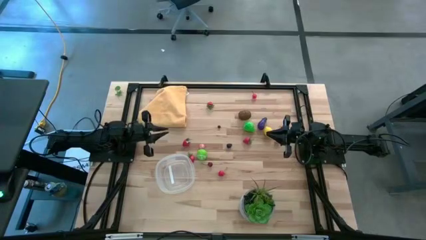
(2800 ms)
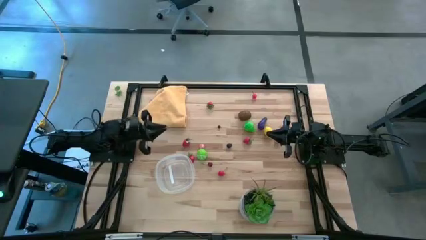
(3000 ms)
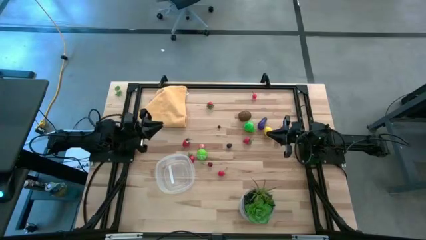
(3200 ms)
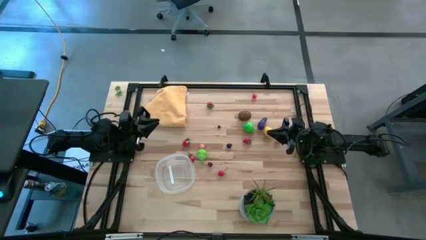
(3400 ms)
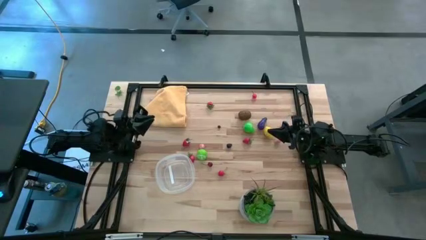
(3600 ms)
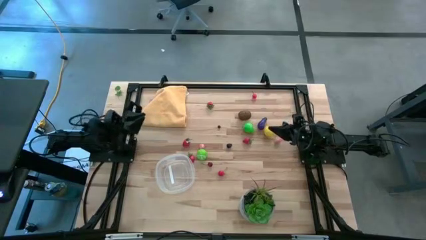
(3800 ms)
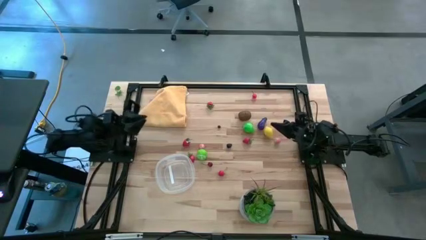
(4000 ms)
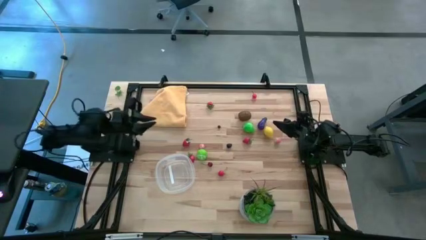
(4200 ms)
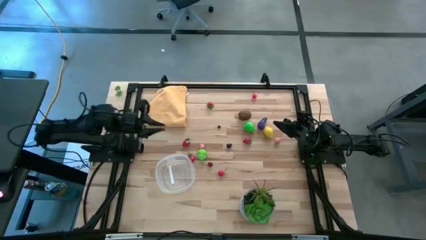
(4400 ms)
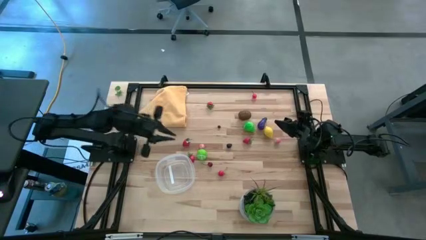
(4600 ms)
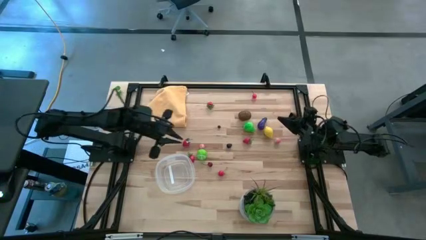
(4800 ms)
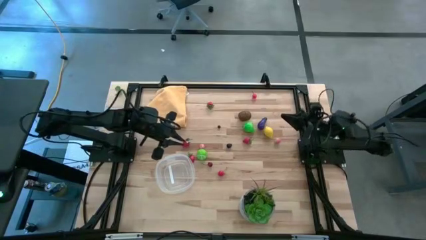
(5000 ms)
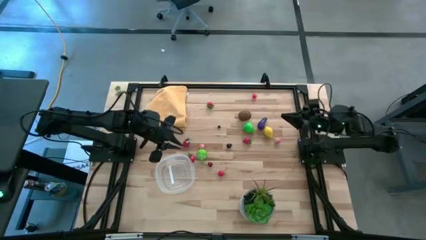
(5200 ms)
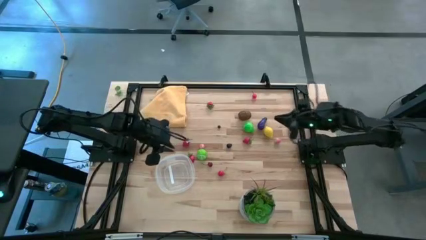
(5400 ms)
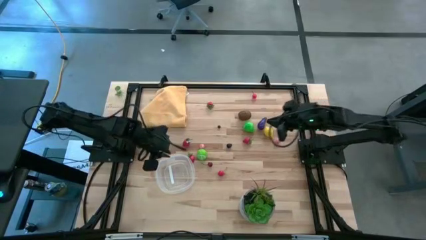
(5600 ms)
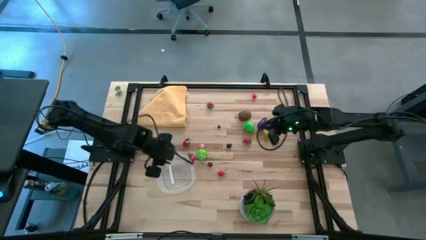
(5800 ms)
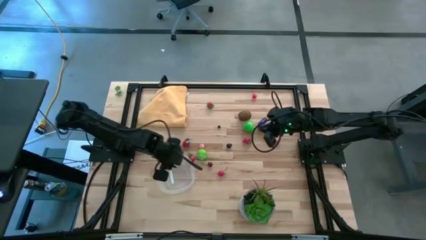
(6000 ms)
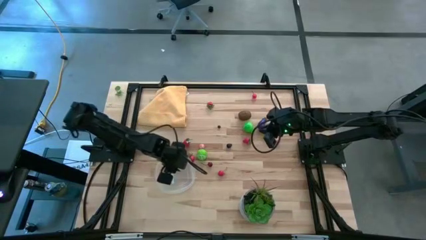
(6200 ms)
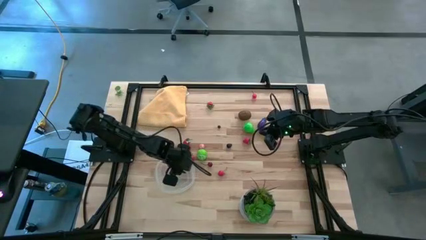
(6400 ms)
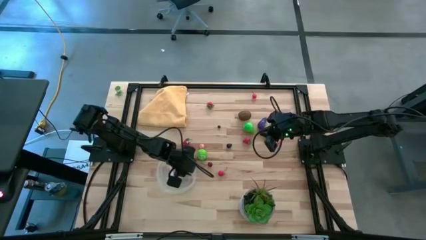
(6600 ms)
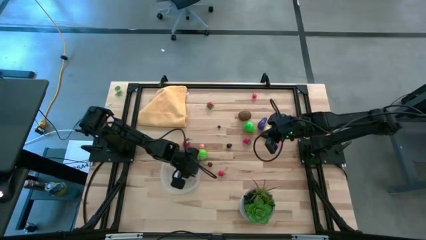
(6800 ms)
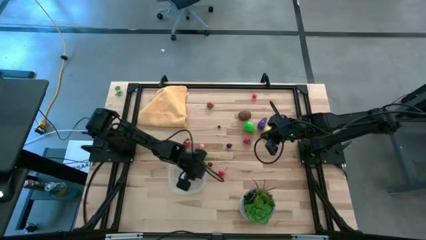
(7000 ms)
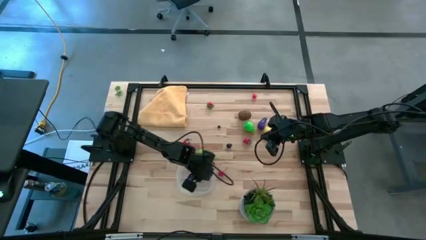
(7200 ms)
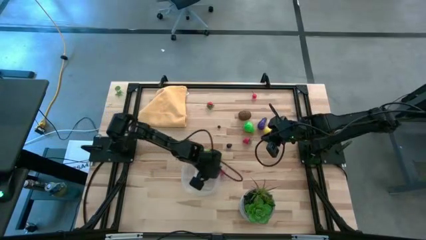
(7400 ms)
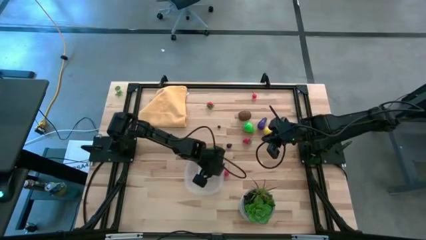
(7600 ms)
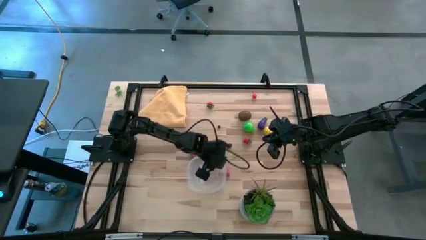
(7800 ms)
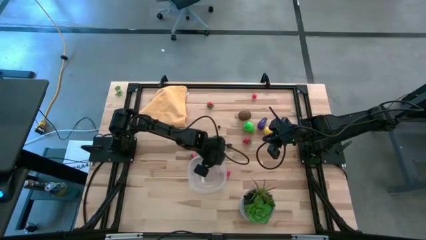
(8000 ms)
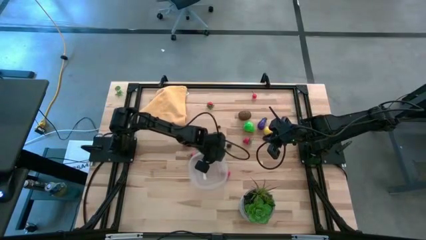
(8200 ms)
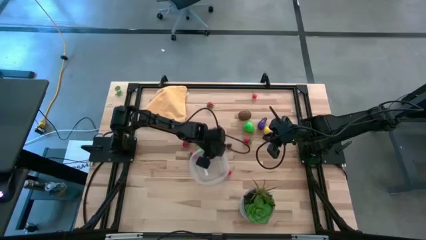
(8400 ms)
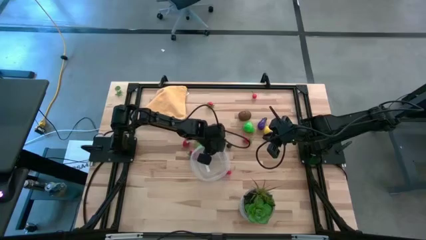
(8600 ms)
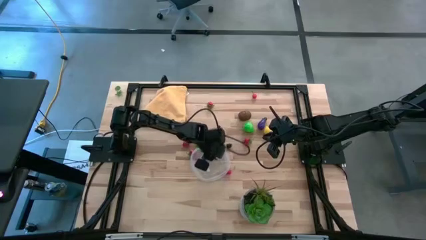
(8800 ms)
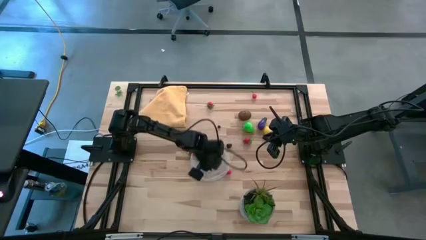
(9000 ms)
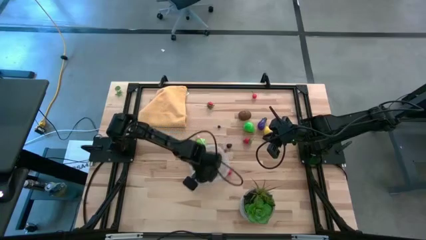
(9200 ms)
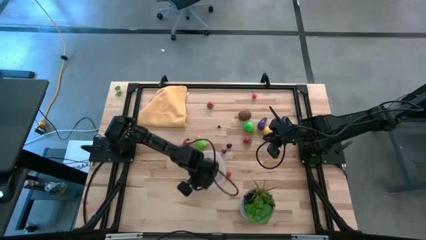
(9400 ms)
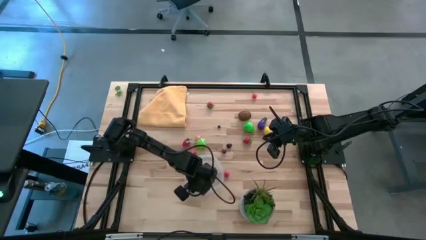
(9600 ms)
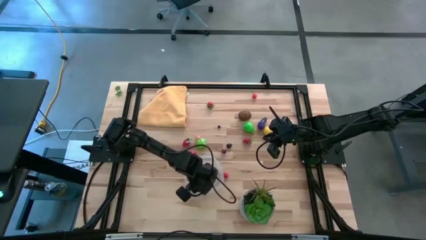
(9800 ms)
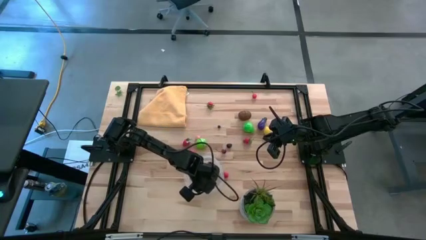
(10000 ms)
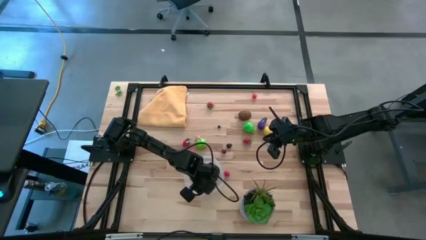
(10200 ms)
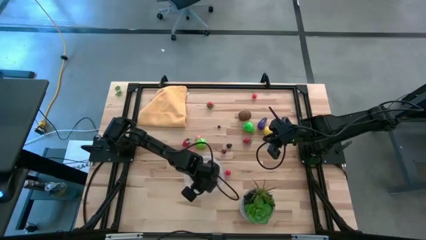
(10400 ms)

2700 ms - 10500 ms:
Task: Pick and placing Produce into tupperware
Adjust the transparent bin

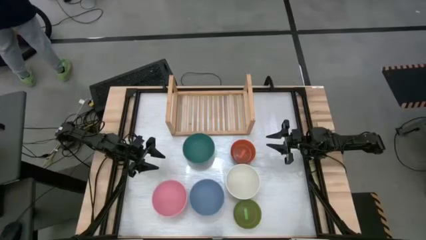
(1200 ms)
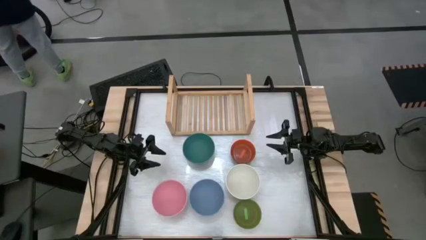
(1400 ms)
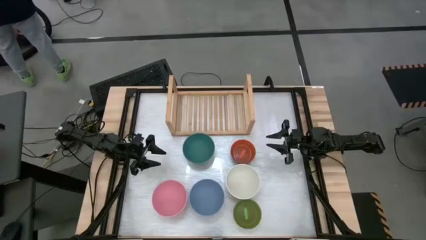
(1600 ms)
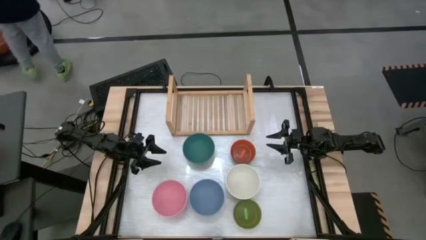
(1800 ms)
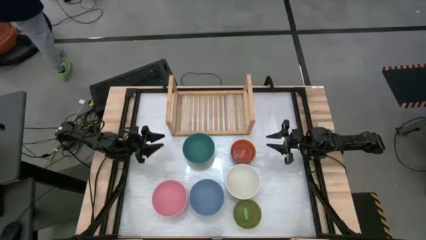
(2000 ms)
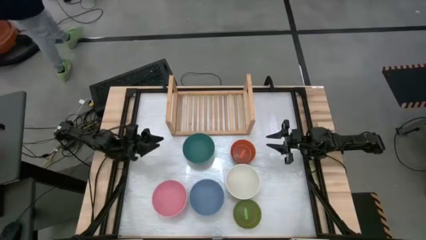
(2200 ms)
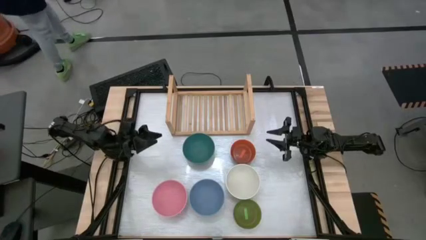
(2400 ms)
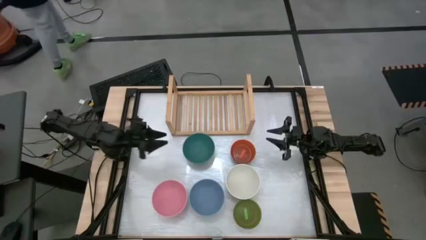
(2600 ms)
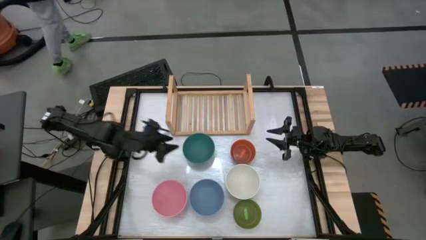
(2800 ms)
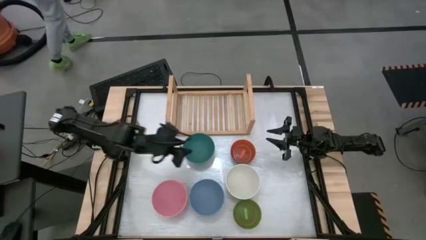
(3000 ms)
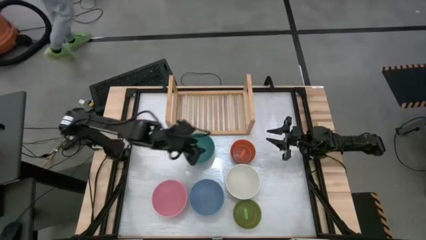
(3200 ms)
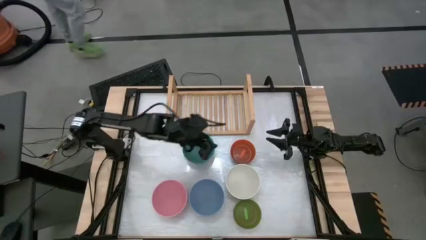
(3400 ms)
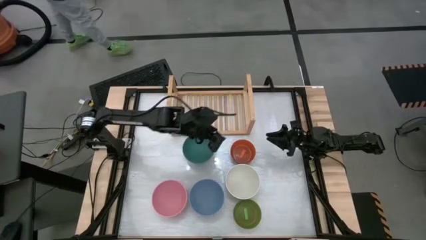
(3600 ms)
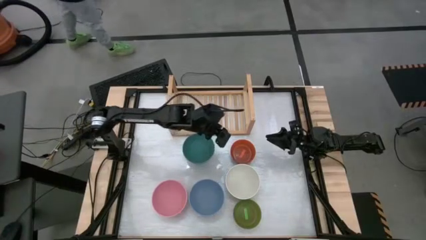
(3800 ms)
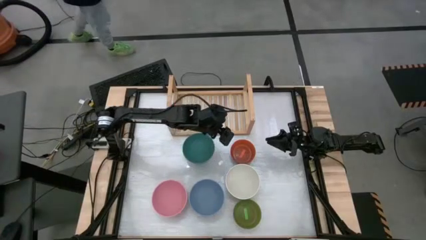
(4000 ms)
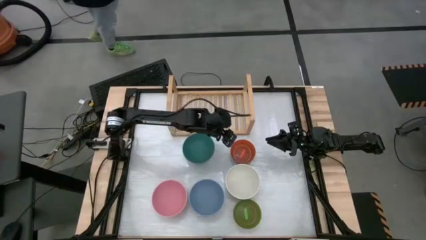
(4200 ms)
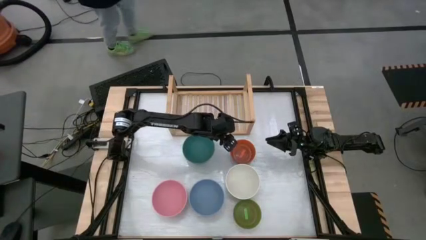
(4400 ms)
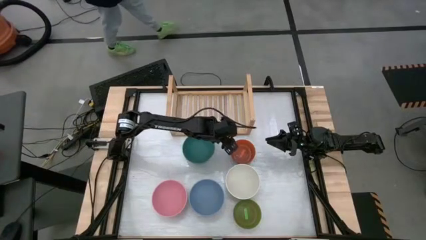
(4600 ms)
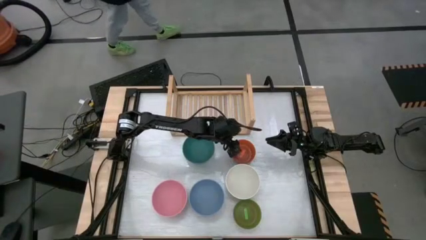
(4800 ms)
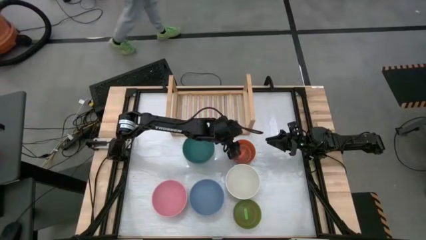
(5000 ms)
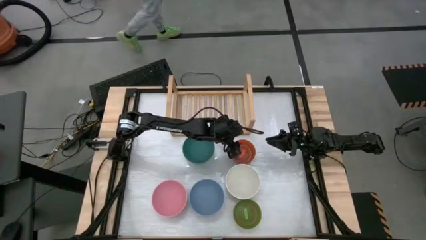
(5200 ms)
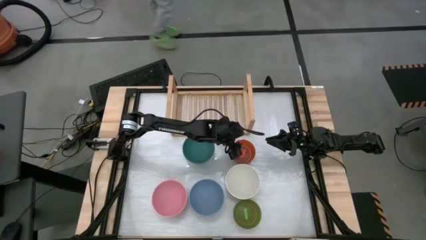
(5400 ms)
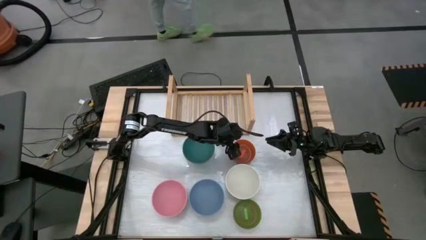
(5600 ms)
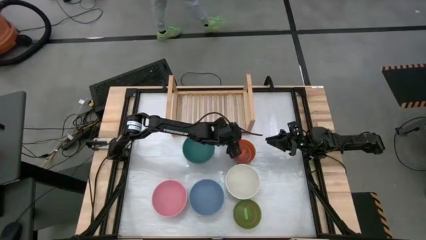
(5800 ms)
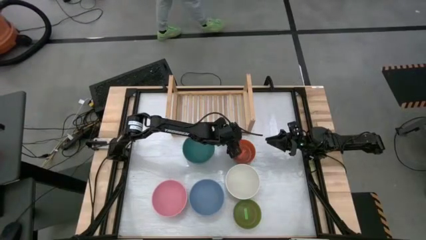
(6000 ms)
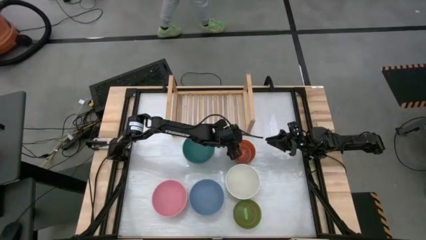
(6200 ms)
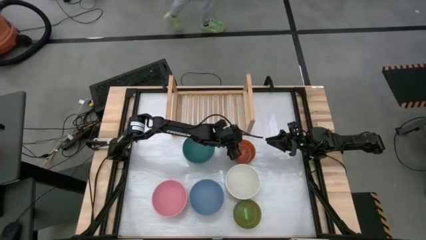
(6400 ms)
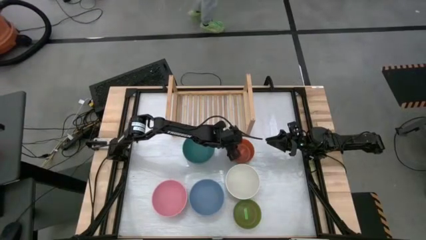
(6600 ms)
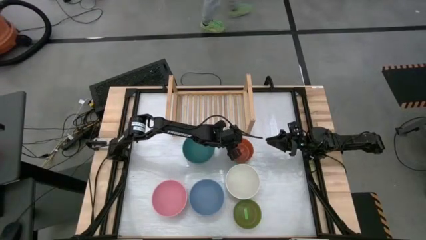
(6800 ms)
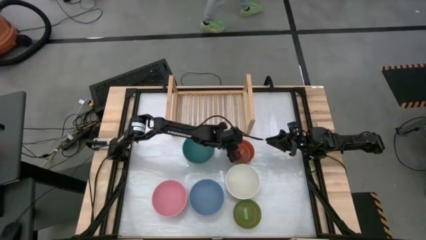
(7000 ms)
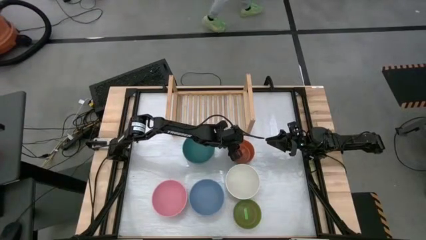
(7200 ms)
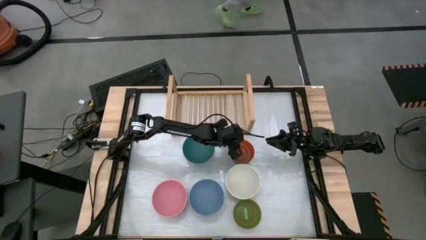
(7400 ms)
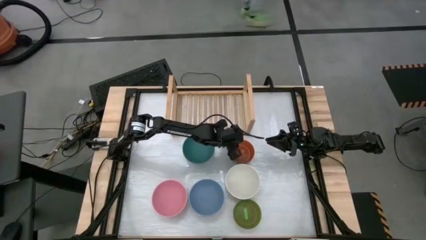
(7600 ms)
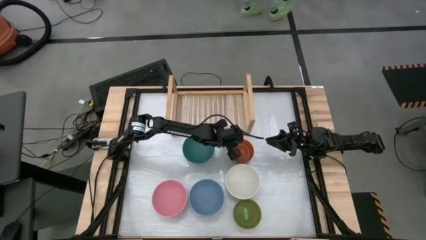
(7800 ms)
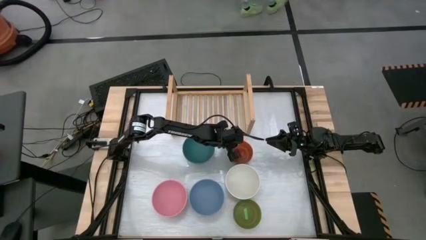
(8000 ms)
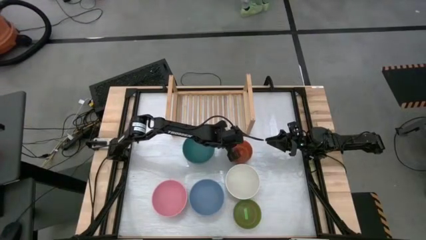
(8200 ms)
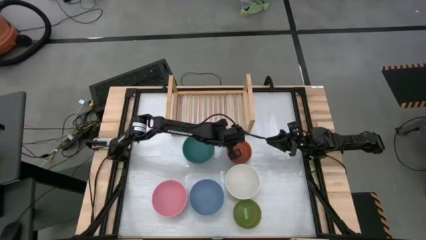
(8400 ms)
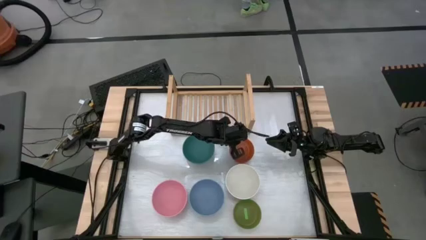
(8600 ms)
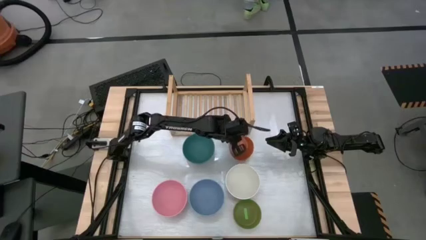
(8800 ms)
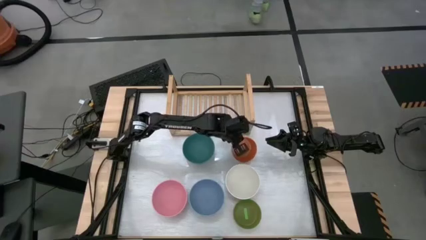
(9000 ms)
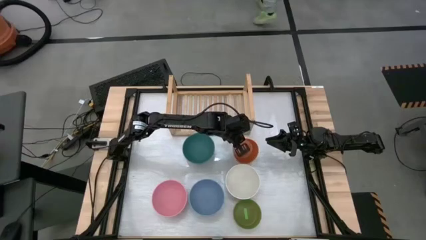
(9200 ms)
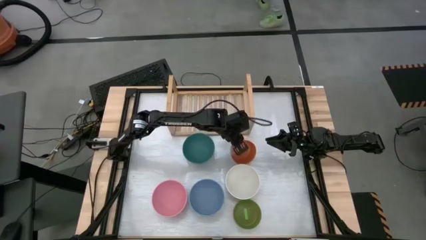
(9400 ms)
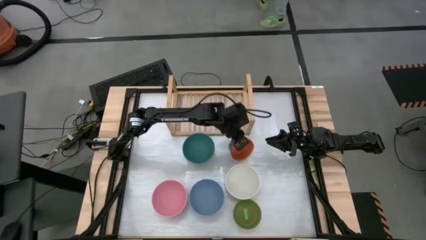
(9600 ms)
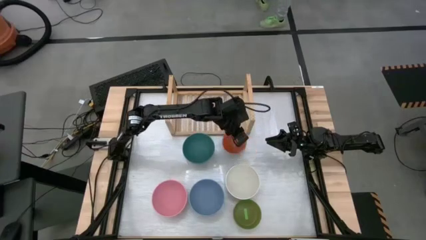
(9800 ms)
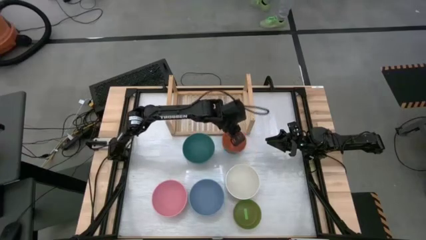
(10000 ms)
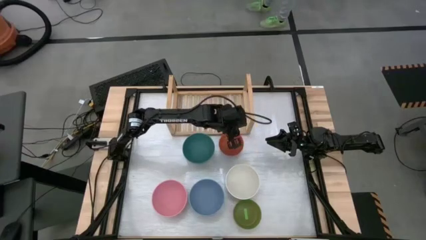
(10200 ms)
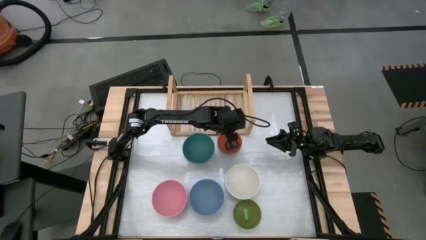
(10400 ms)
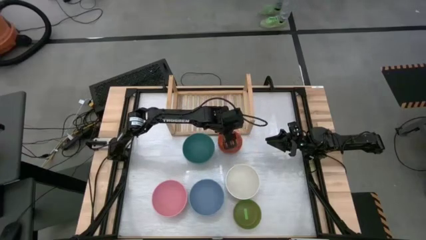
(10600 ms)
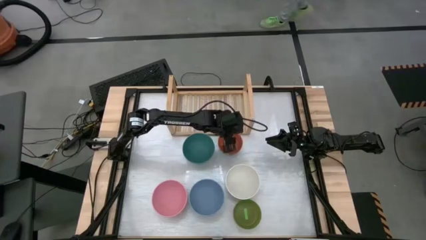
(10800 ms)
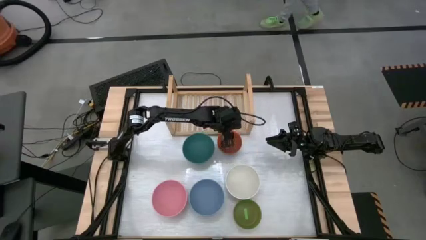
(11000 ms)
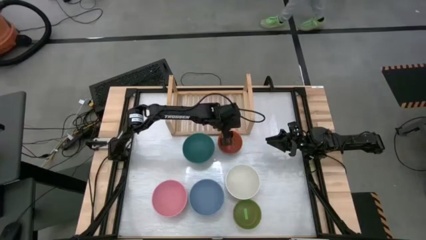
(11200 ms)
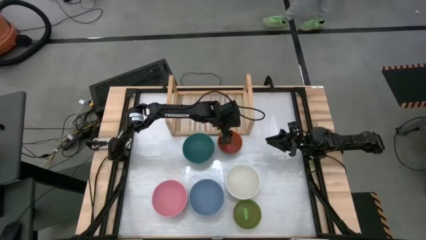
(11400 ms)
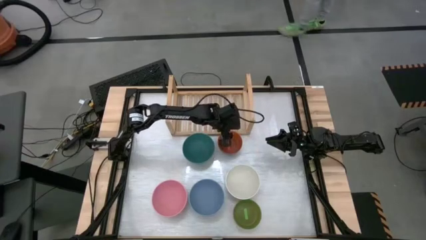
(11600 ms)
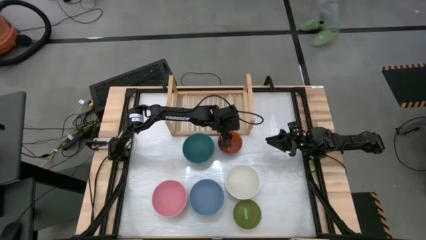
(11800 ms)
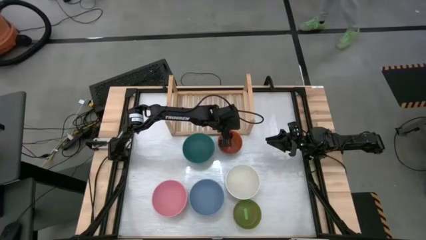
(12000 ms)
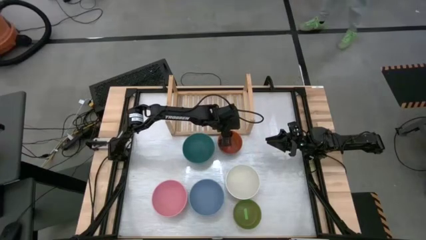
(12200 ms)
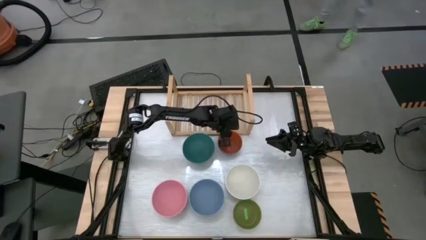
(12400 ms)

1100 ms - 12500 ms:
Task: Place and stack bowls onto a shelf
Stack the colored bowls by size on the shelf
